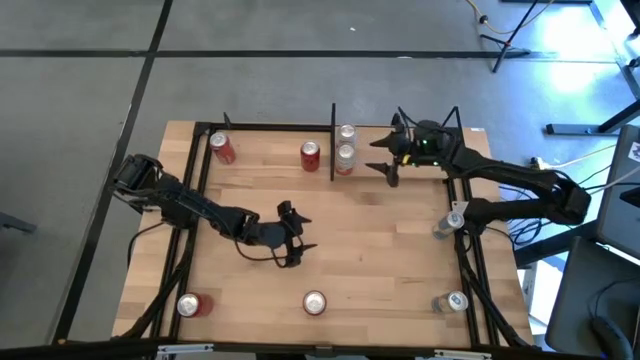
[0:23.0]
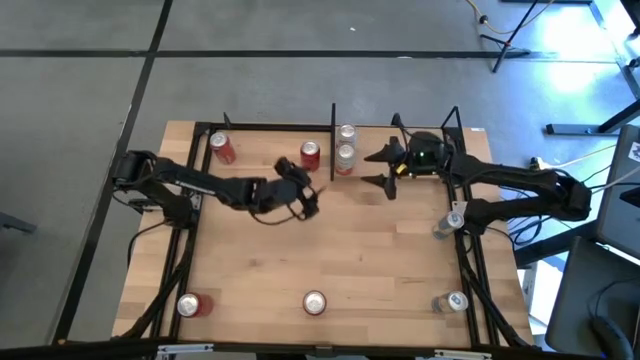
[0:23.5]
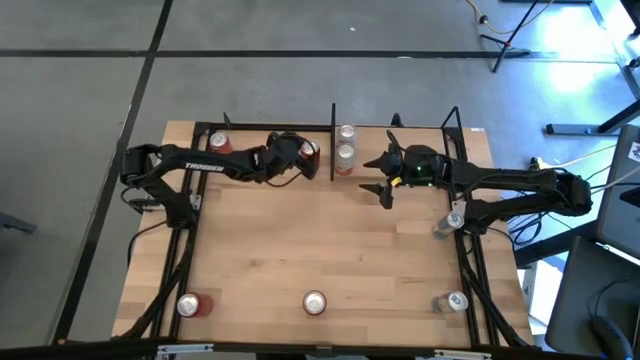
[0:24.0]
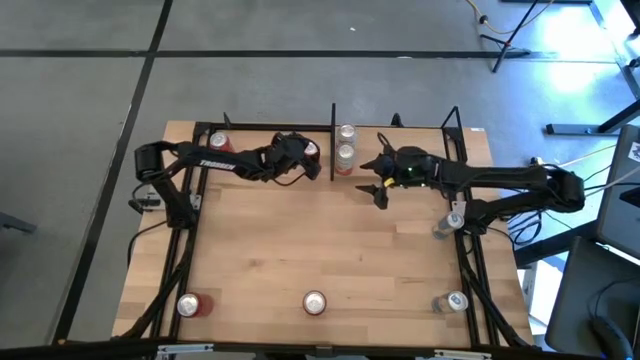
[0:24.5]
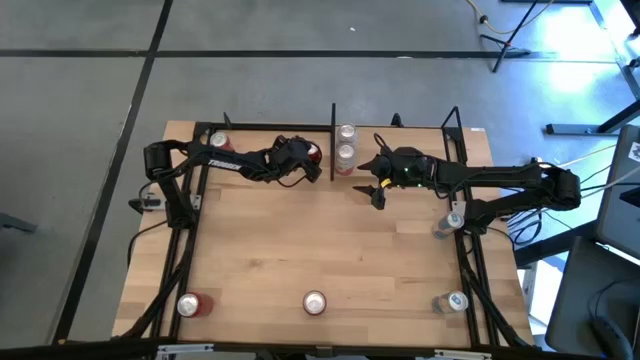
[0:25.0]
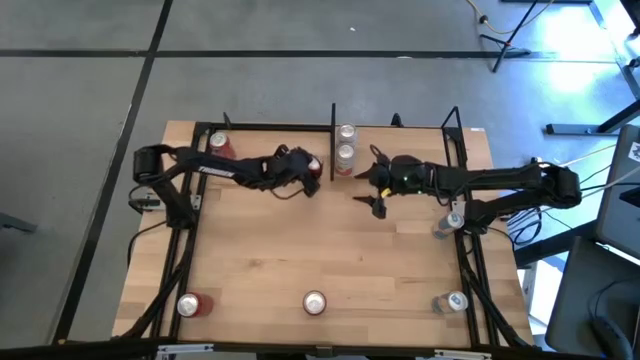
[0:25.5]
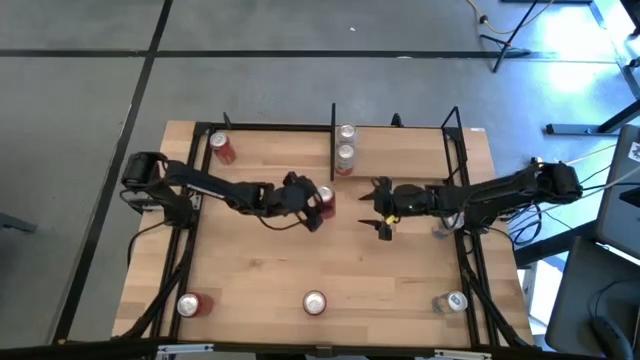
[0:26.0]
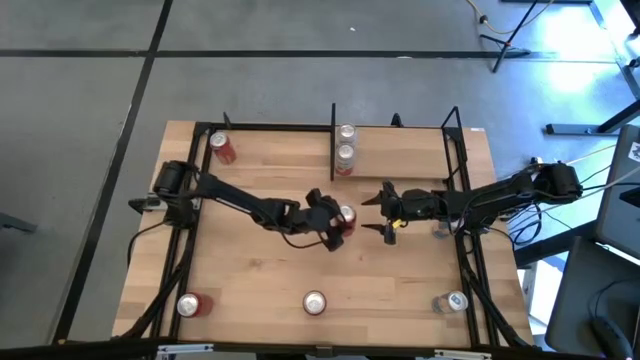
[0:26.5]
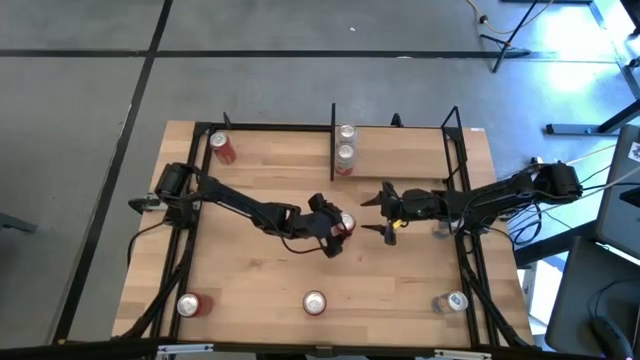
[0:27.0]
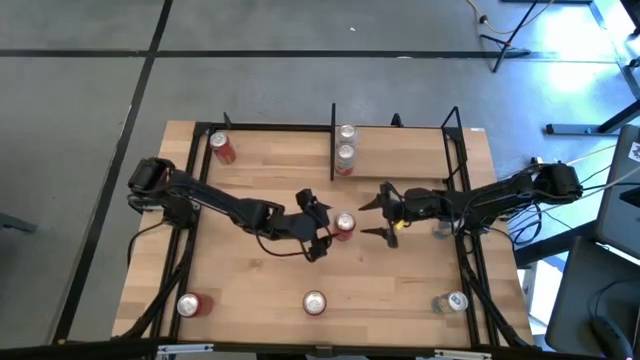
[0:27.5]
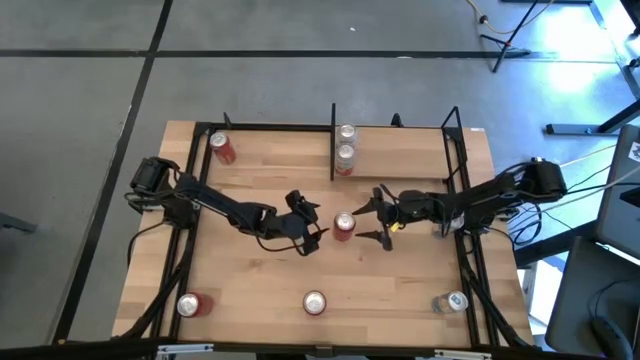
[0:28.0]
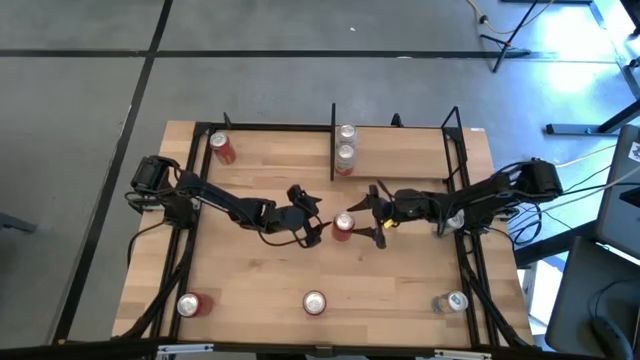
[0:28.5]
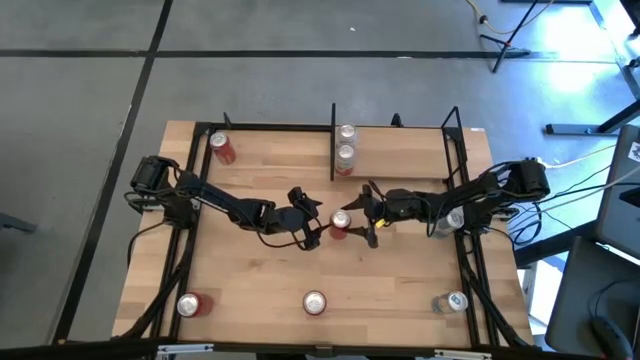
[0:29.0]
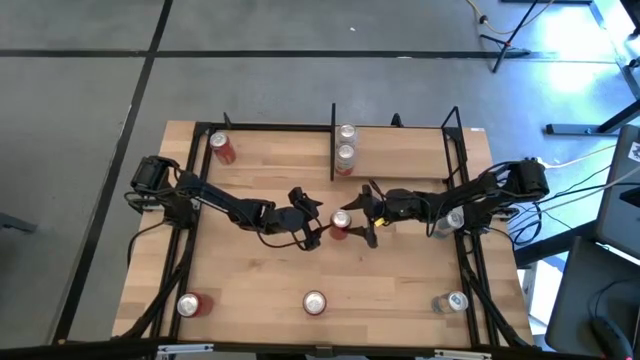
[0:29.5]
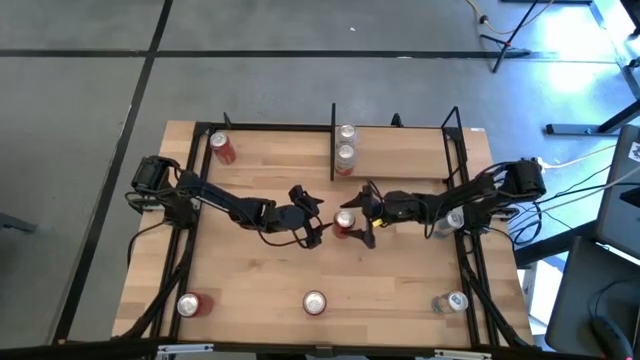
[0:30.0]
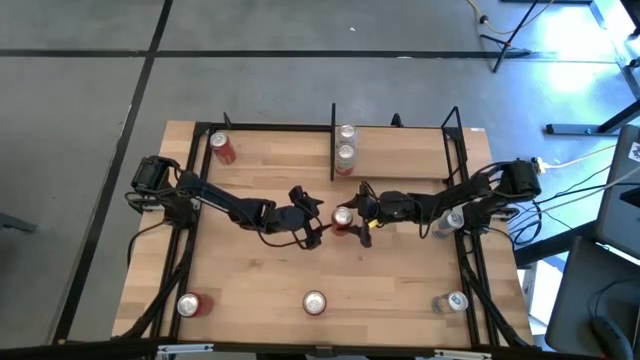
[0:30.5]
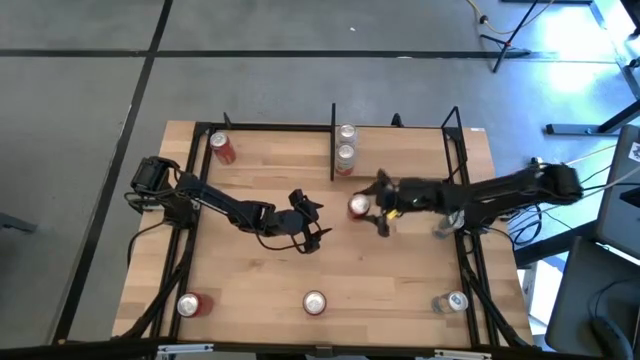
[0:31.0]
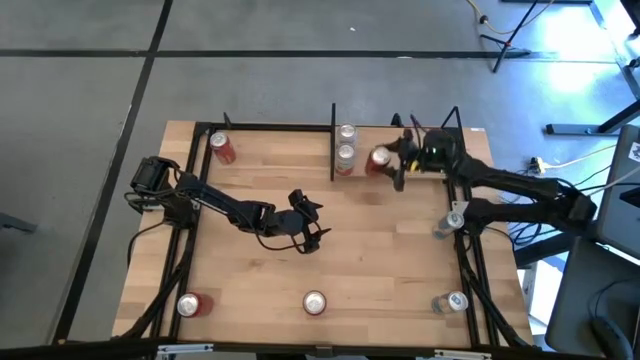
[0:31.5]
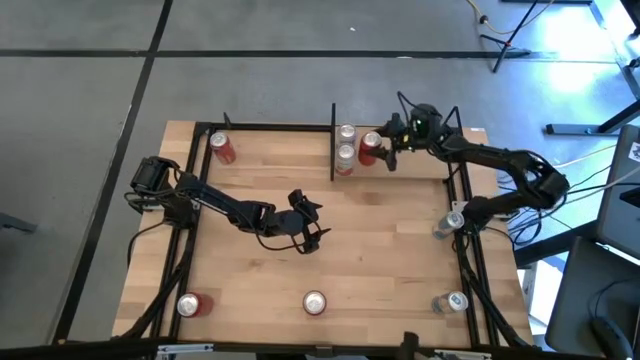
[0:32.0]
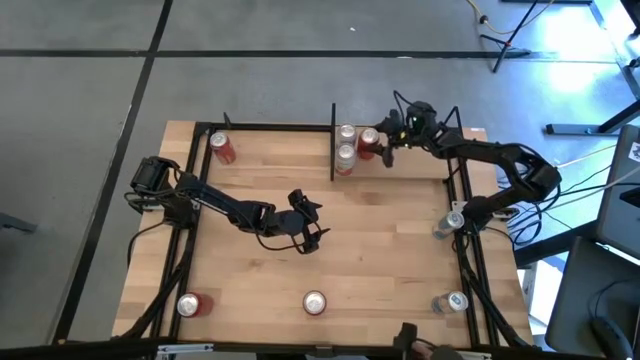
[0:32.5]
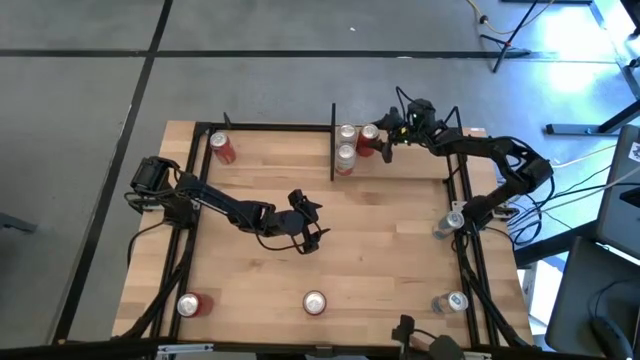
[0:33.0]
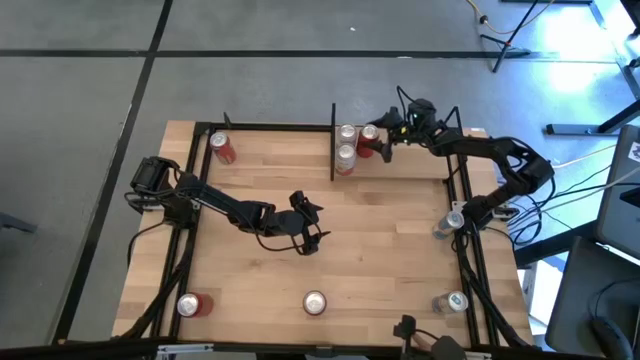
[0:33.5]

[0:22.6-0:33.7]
Task: Place canned beverage on shelf
Put the top red black soda can on the shelf

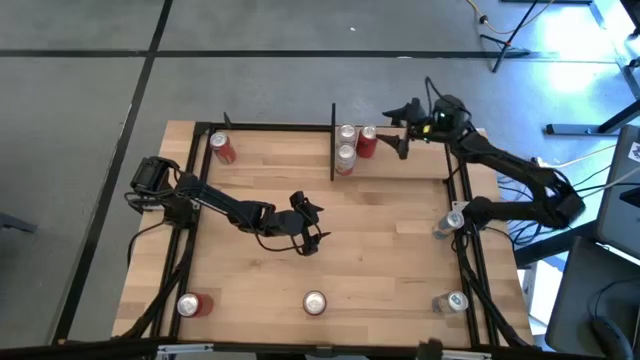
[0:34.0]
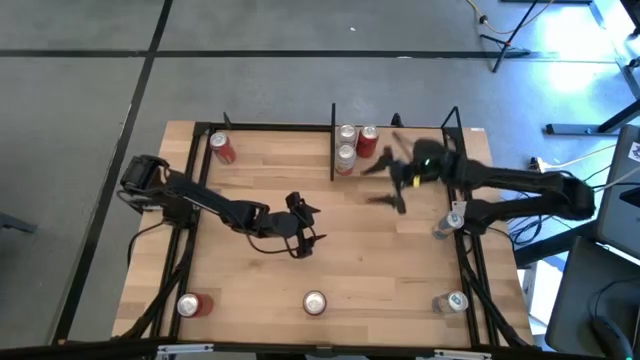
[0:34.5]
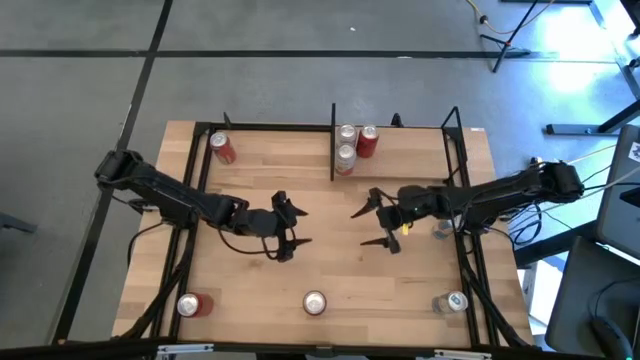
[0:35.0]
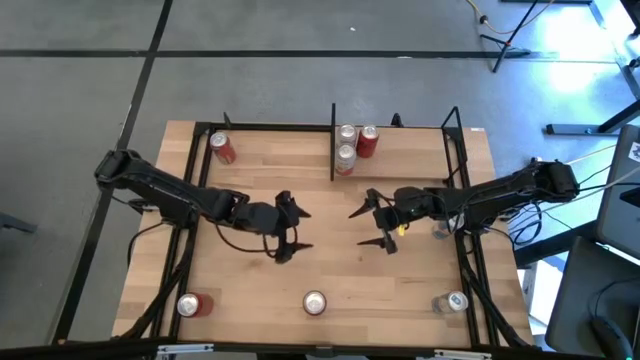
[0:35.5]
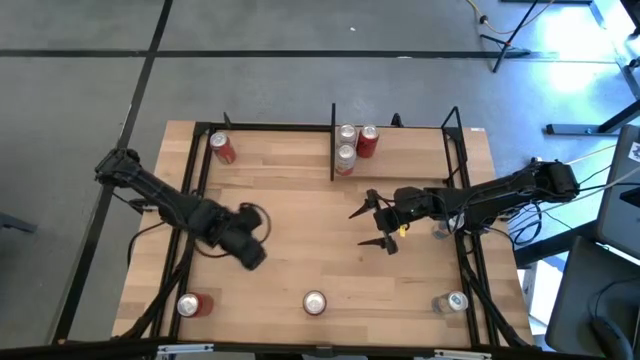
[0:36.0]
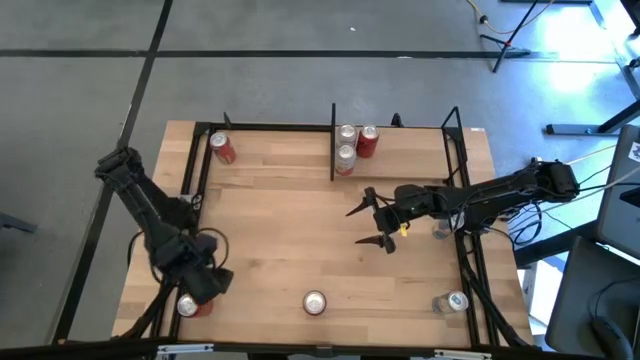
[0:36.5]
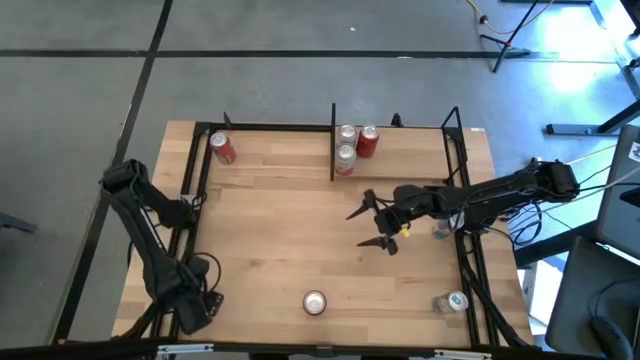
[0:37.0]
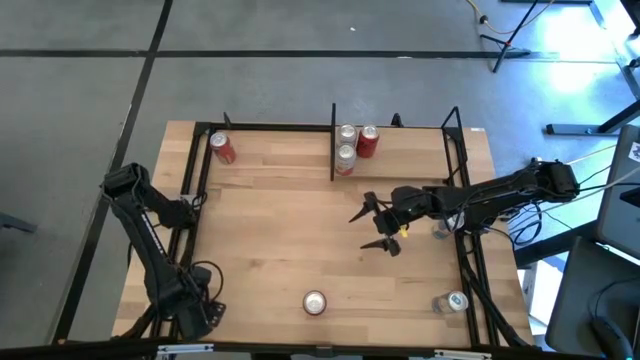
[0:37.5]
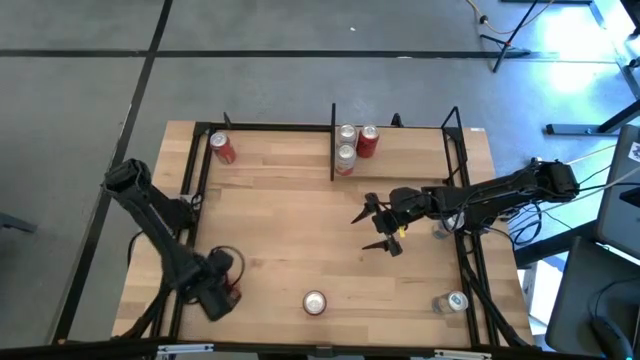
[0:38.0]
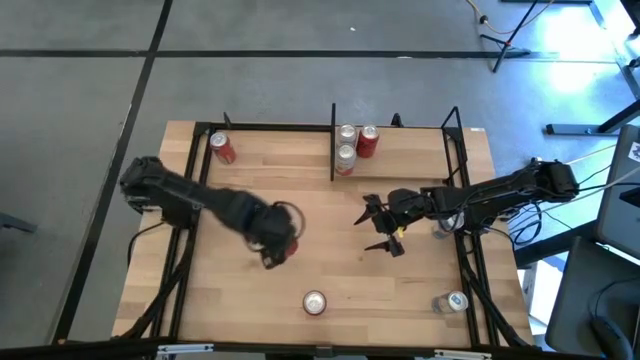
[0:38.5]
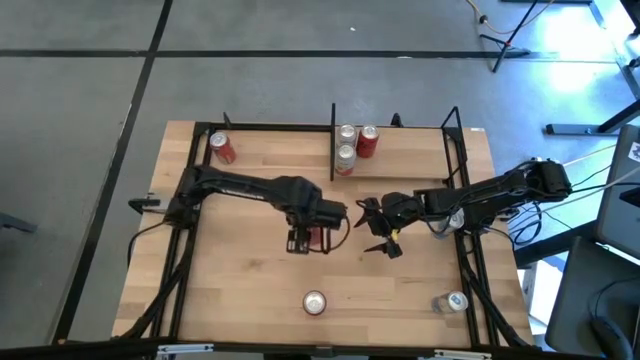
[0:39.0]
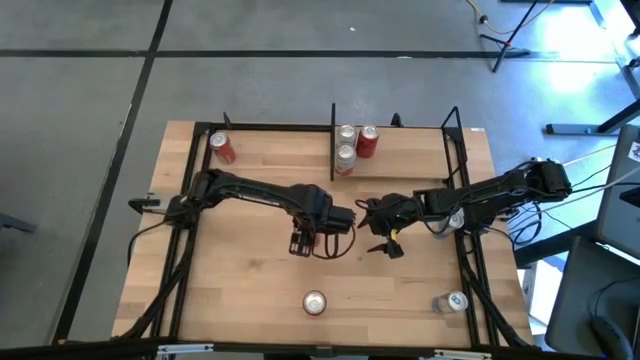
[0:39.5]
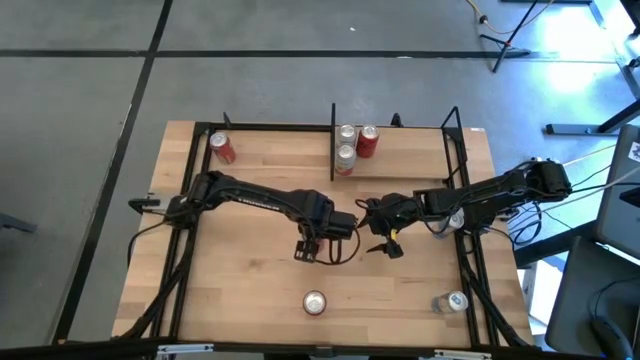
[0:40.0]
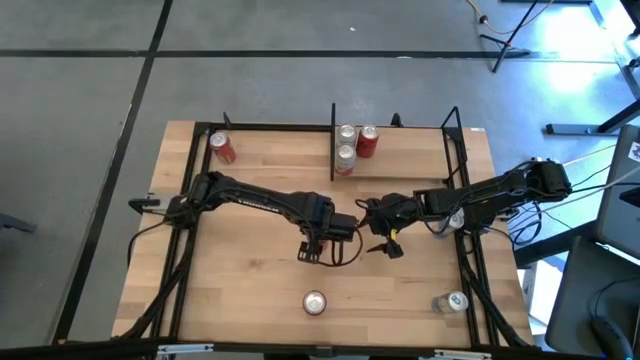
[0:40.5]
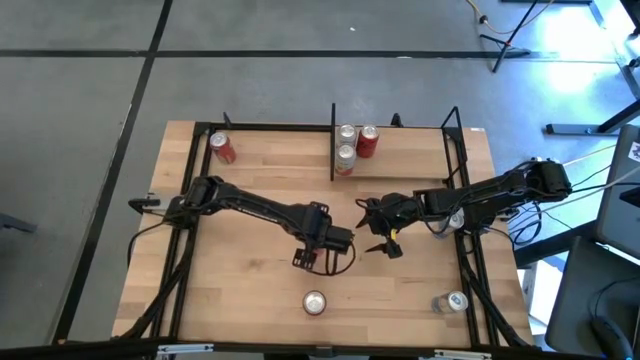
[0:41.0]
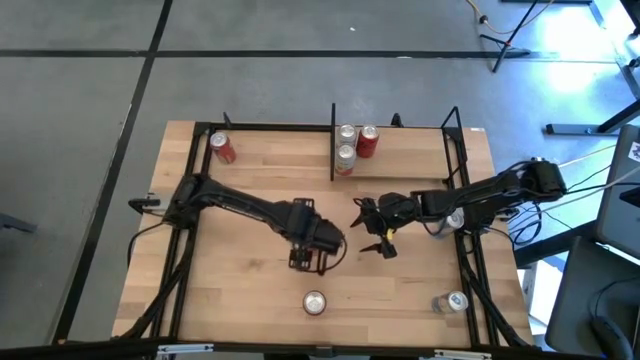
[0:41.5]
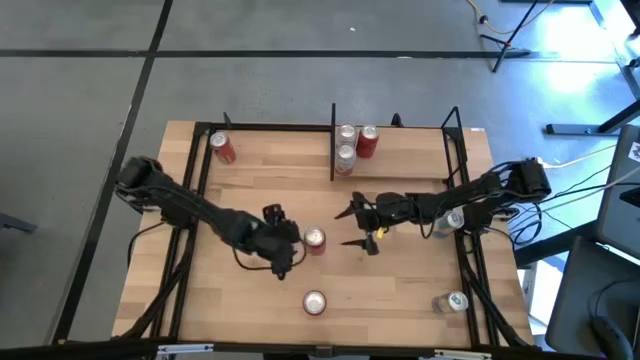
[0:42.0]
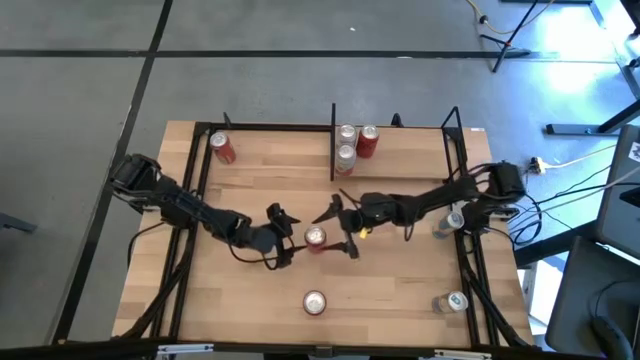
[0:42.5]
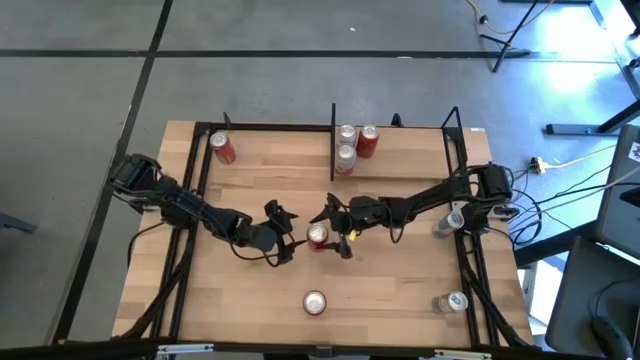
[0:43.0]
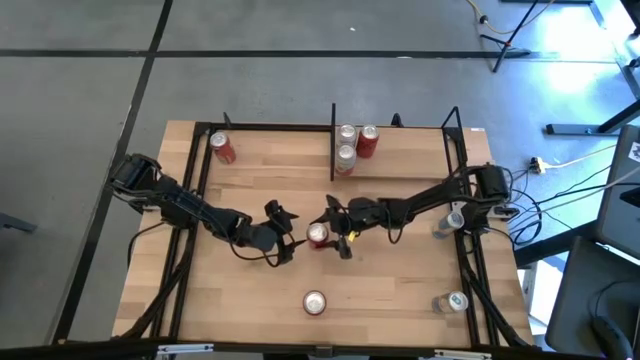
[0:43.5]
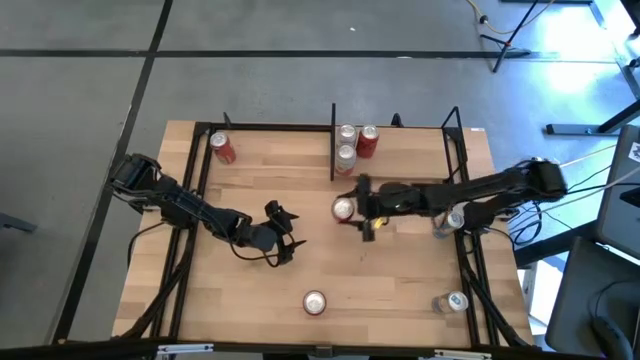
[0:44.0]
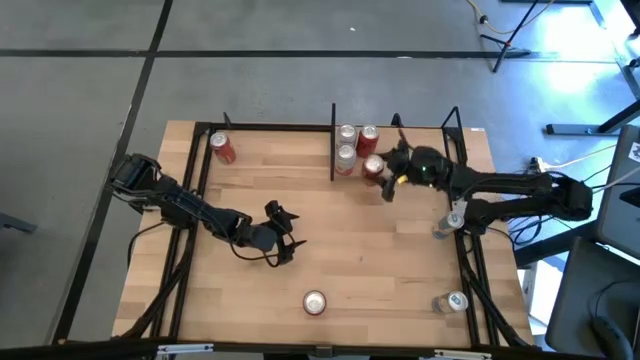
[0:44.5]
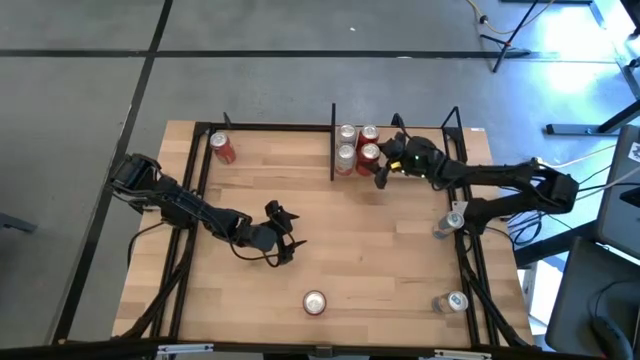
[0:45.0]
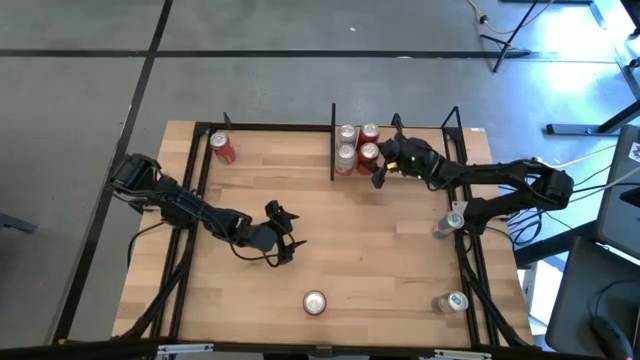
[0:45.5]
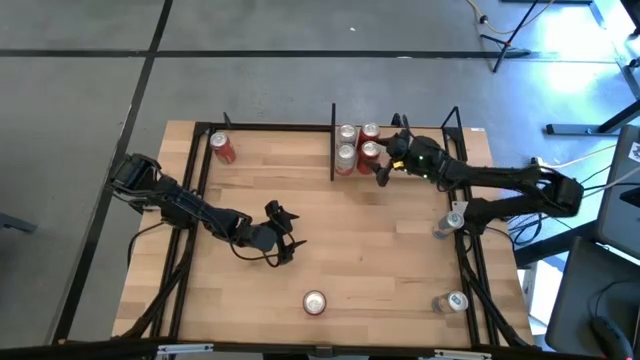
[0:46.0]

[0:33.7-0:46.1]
Put the red black soda can on the shelf aligned with the other red black soda can
